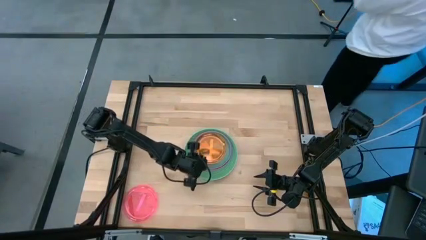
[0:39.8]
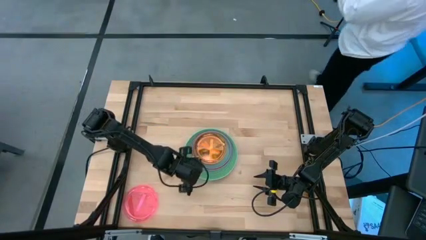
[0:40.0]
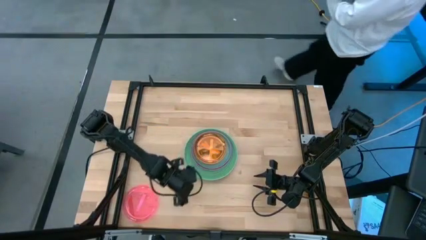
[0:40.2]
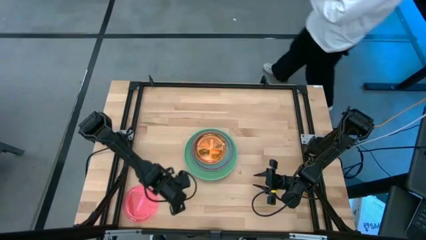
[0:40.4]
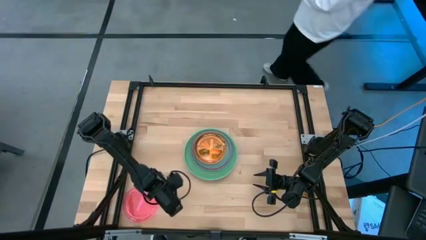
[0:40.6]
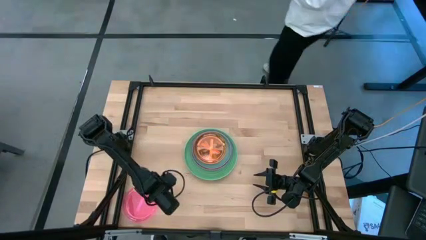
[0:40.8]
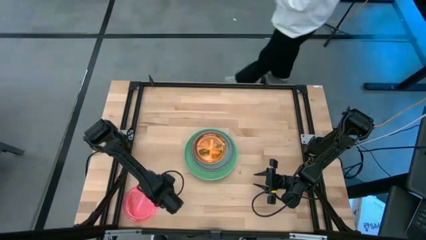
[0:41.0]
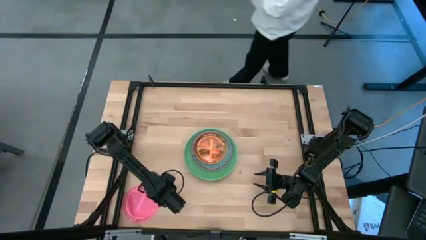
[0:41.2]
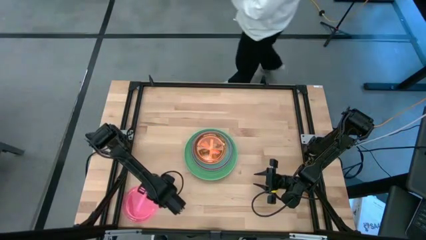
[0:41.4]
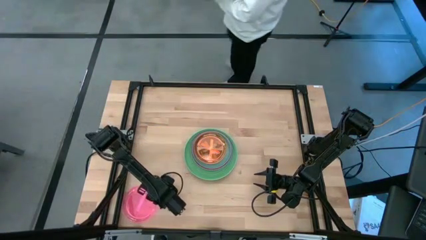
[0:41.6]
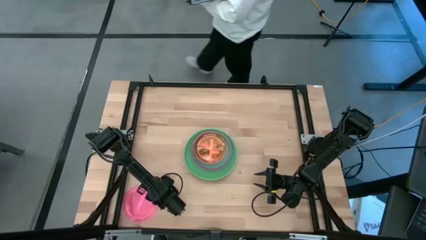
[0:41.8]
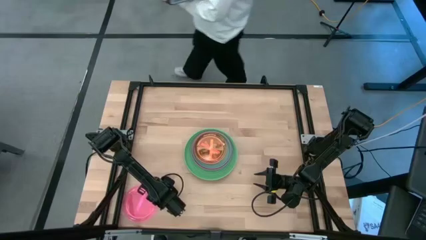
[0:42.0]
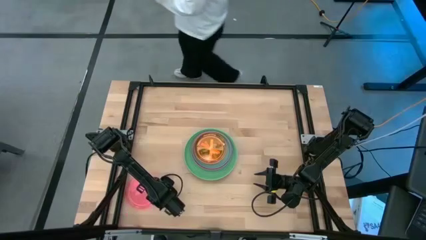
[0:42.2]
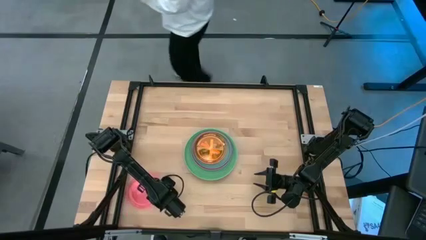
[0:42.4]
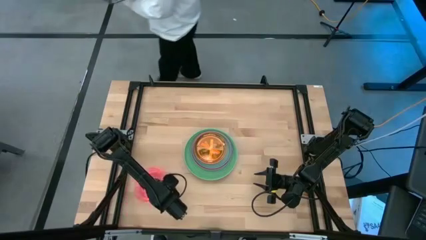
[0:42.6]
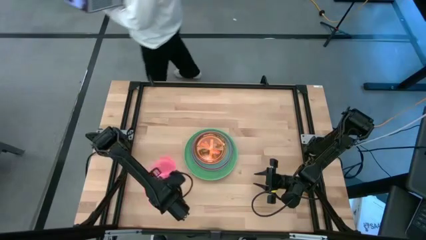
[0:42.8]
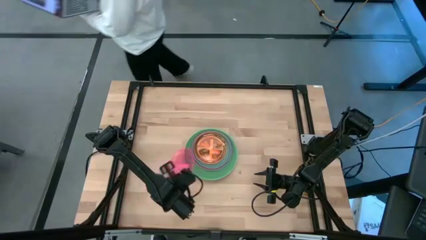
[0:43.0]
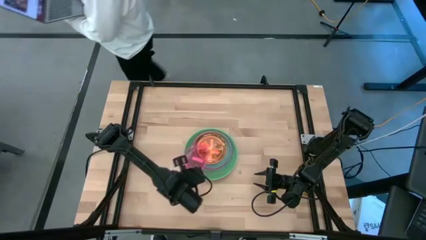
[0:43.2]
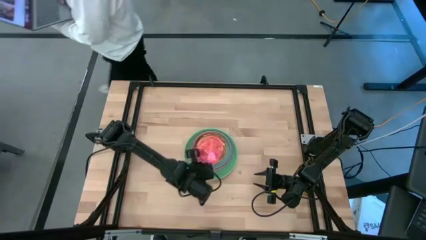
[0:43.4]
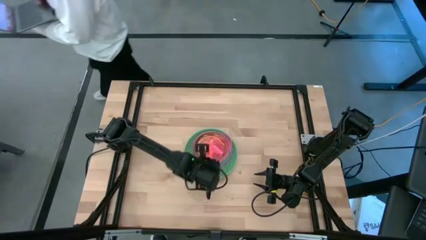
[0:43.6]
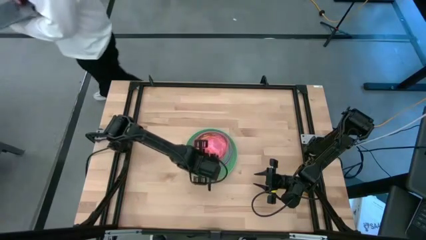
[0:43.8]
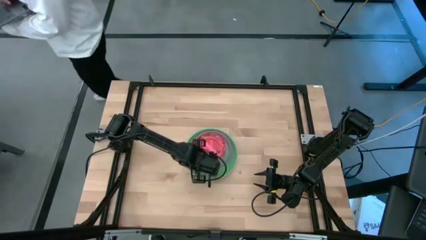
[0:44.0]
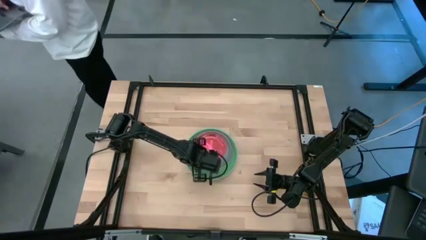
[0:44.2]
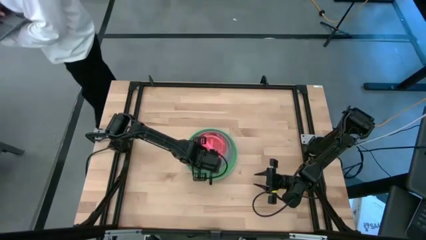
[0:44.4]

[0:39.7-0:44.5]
Task: Stack plastic plates
Stack the light pink plate on the orange plate

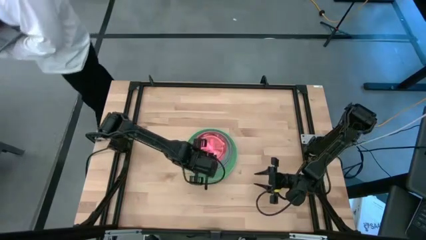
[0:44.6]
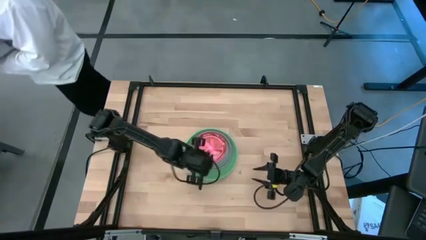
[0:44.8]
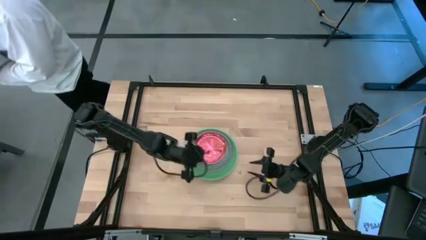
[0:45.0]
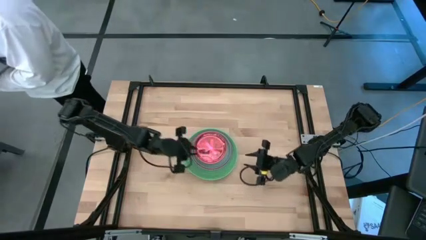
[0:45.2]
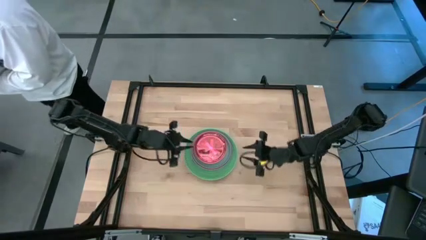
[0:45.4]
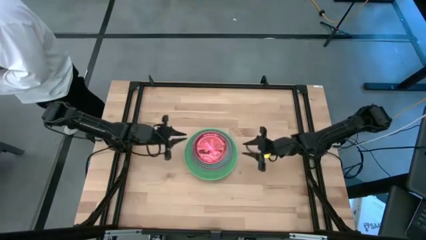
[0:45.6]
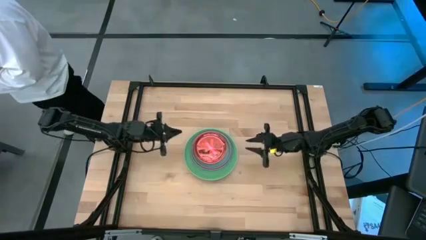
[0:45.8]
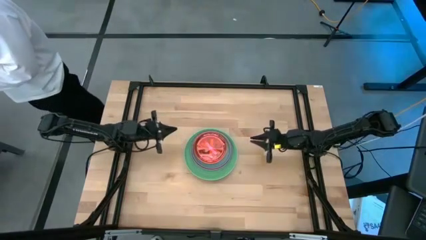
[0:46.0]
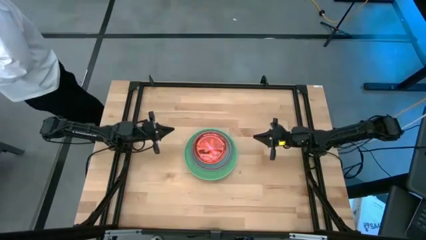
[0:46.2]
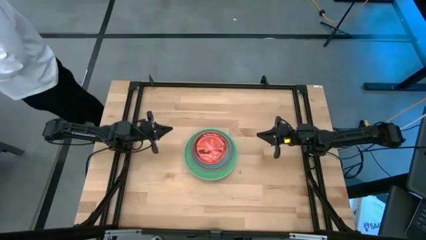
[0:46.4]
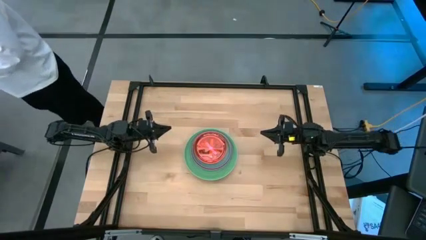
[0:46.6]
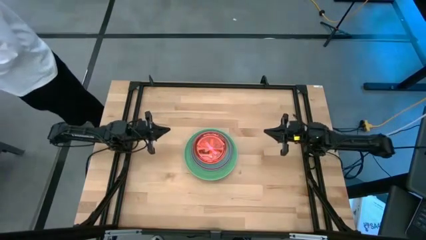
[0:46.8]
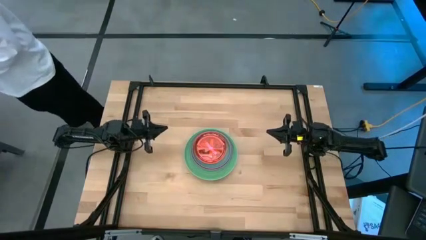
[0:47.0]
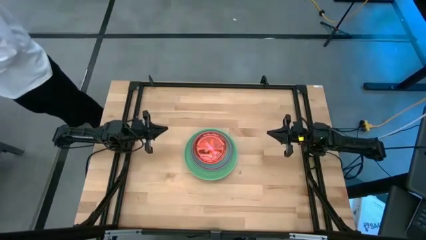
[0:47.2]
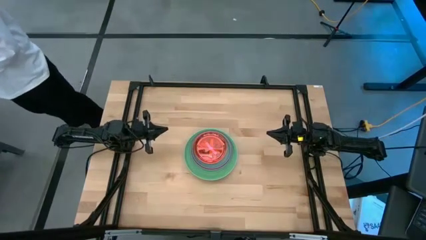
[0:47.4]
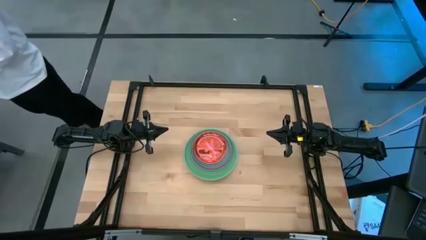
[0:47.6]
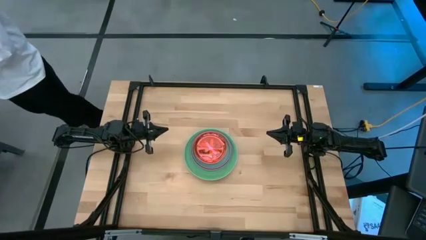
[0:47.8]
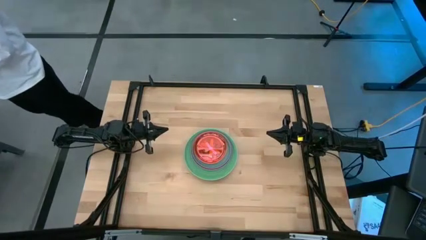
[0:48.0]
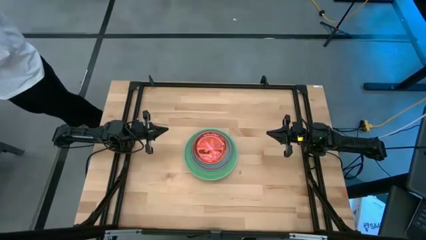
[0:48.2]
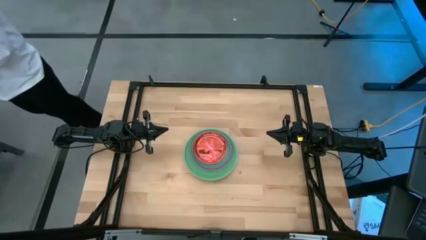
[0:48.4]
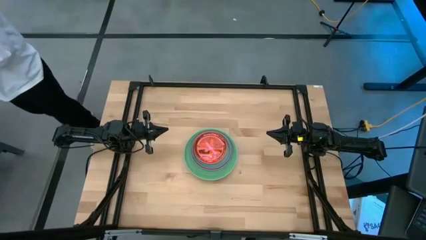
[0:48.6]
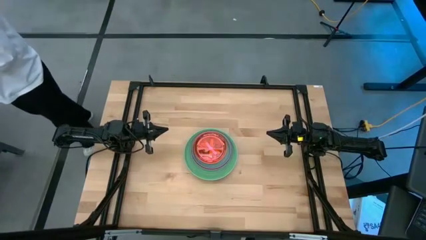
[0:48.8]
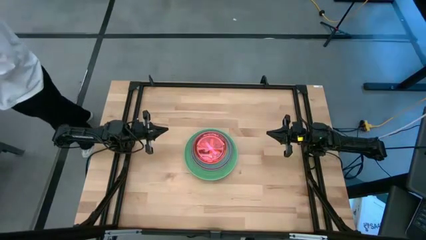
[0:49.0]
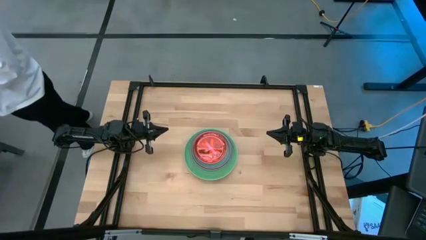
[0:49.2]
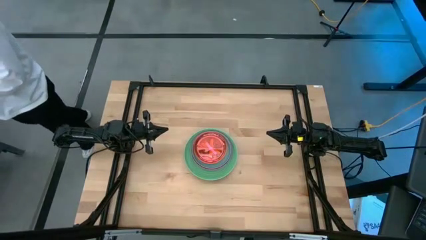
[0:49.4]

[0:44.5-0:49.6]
Return to Home Position

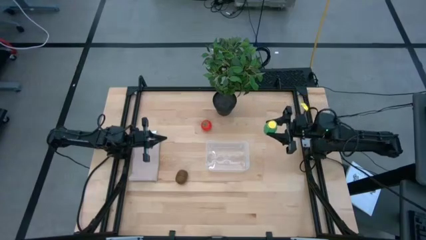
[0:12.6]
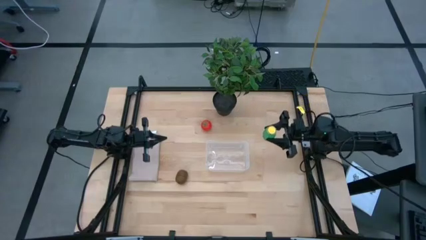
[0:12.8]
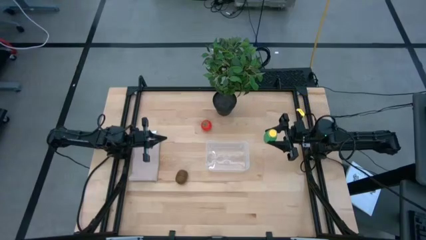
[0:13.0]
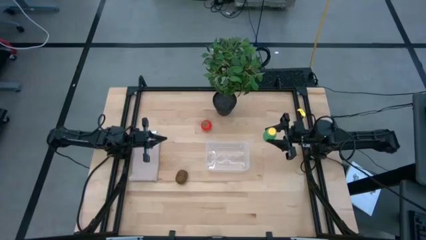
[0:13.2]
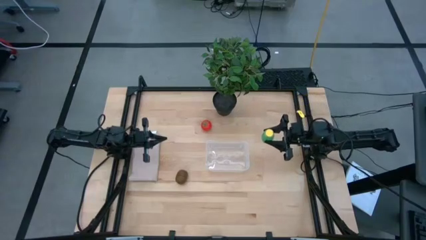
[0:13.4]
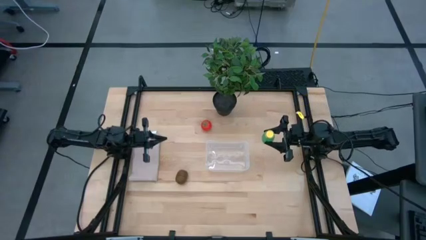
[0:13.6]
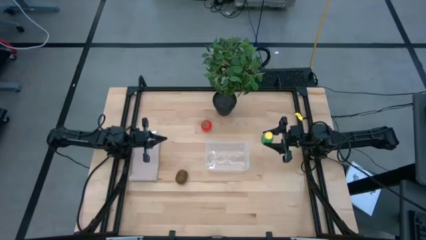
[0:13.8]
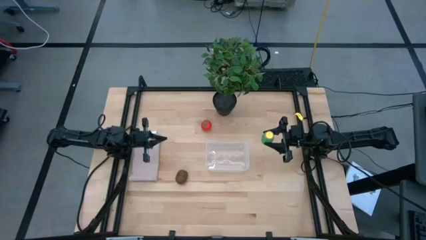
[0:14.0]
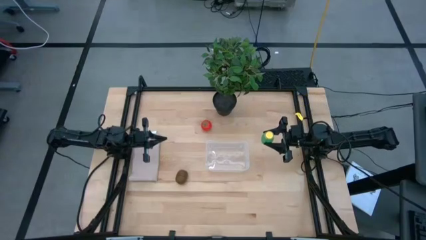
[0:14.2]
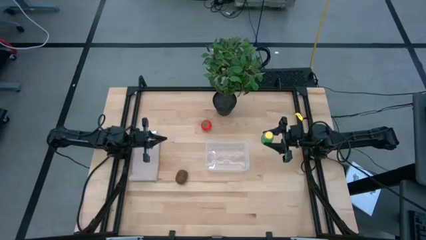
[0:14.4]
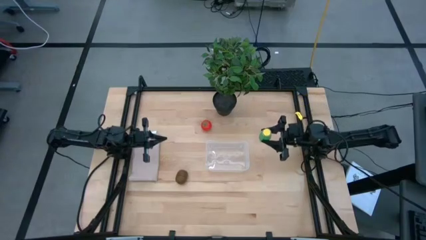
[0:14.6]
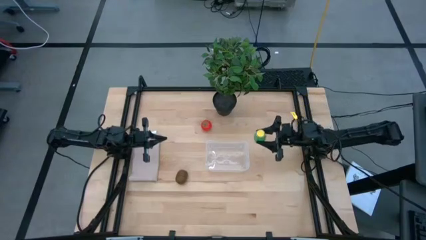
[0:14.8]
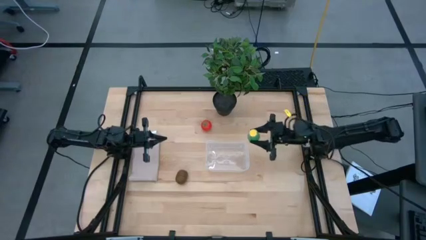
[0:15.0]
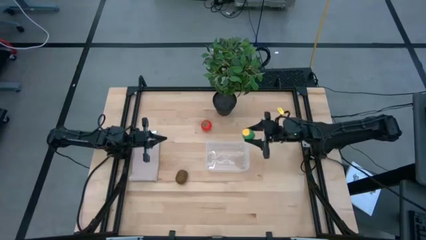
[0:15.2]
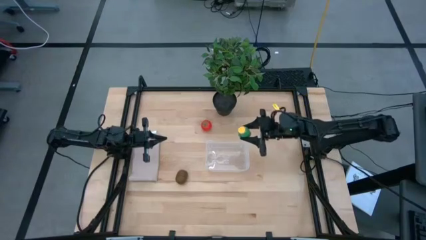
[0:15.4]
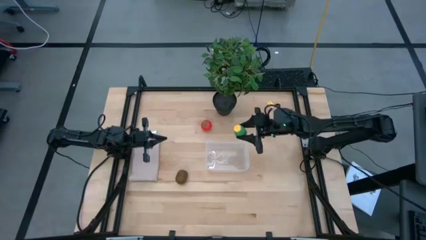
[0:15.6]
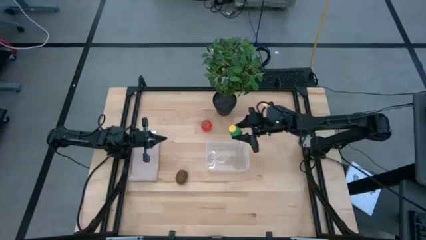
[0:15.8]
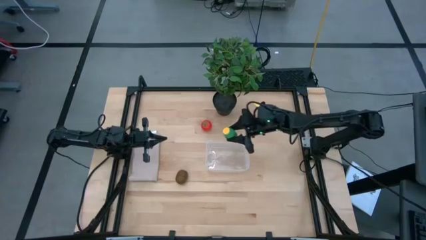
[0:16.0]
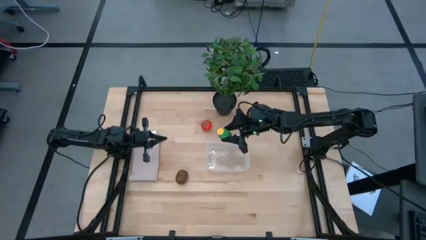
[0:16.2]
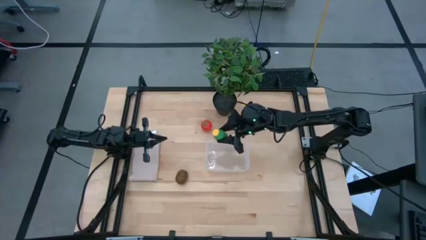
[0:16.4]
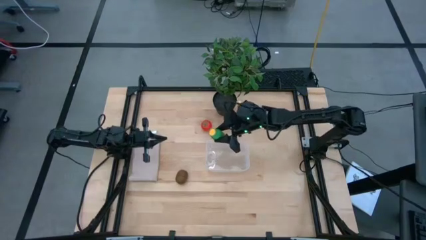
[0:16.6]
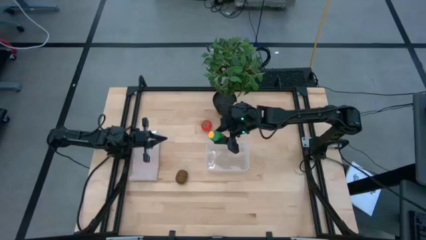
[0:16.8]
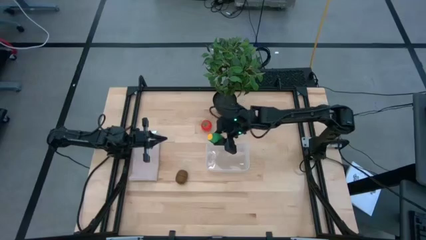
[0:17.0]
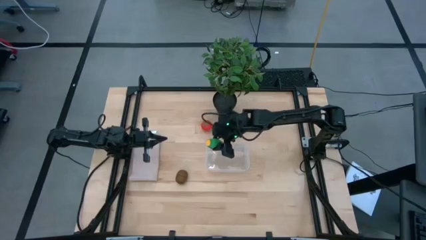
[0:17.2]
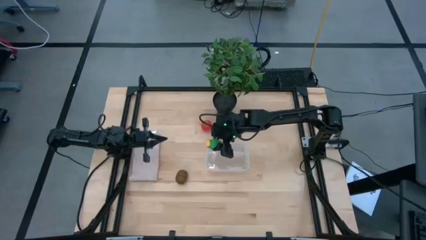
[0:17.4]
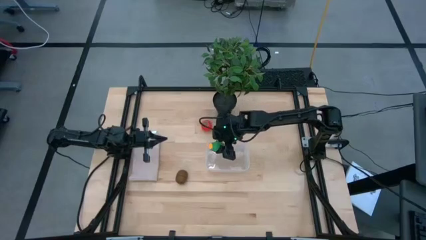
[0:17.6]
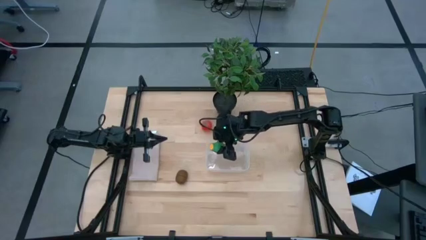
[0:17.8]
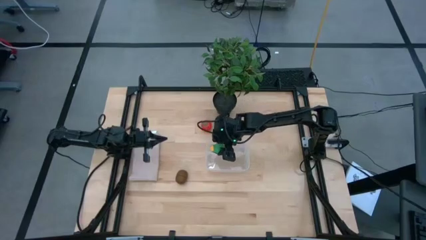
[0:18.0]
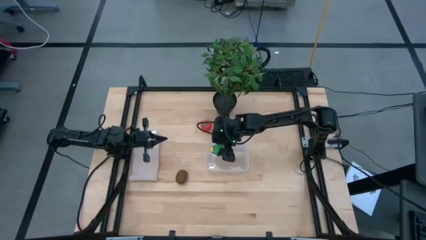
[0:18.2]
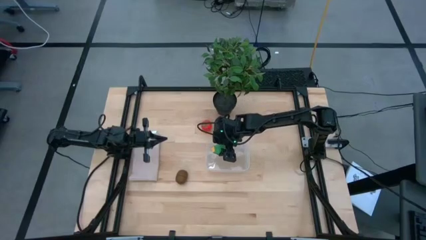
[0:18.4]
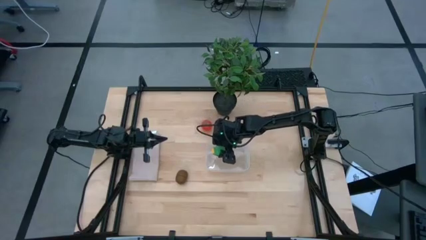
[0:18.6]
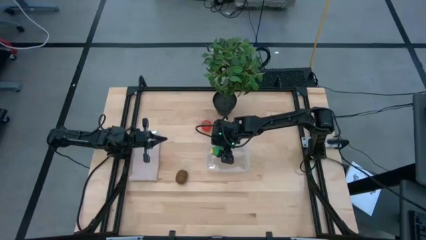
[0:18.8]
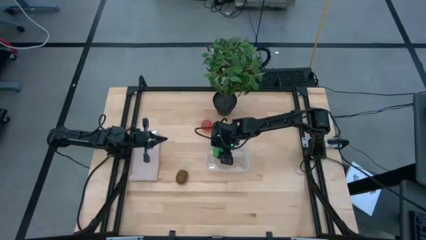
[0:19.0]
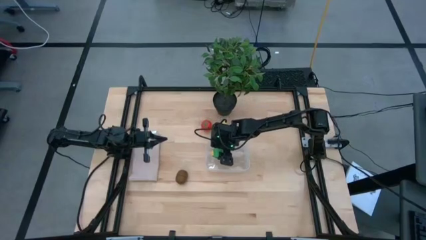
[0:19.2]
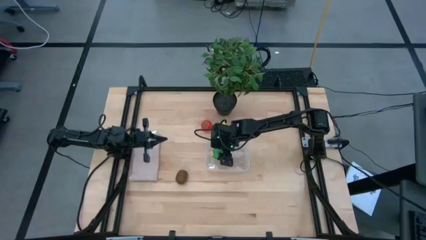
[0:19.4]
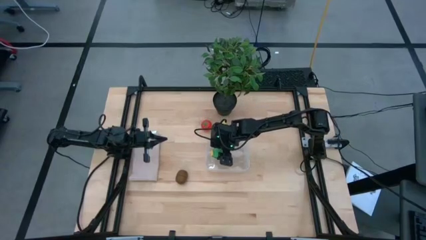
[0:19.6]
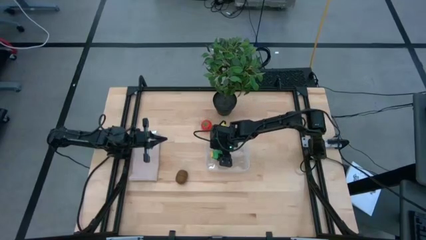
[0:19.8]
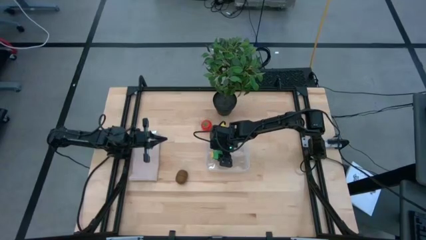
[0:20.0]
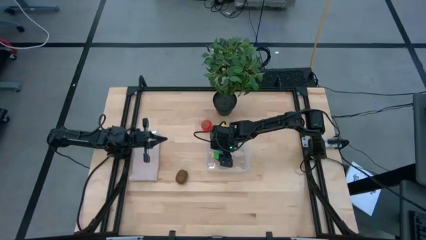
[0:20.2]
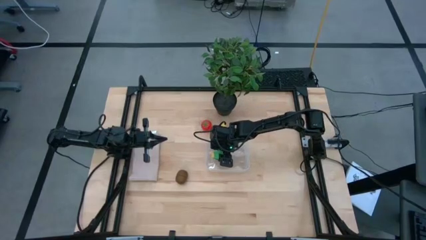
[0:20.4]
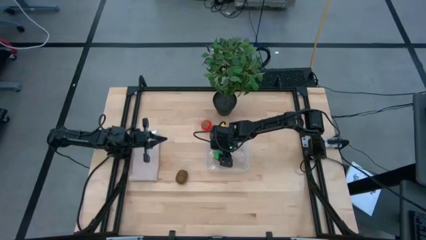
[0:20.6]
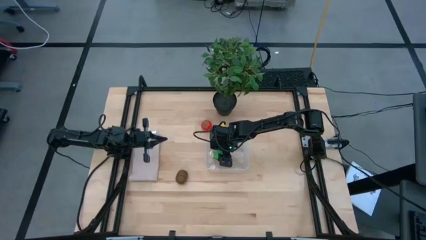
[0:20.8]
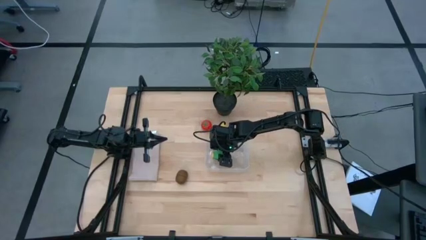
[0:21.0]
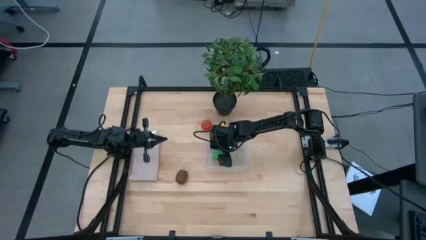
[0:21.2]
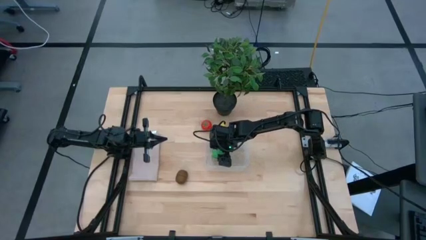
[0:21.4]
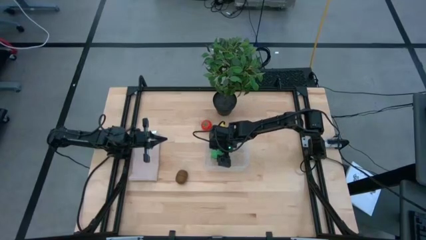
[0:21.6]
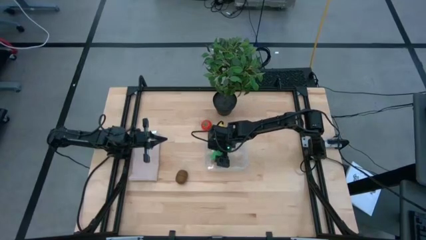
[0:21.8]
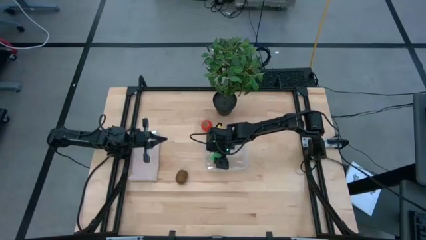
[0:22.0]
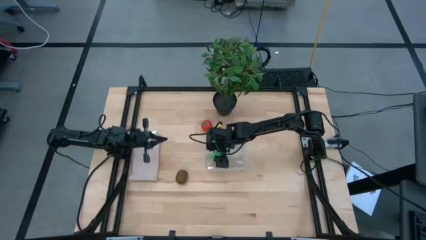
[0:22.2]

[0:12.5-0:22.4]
Task: Pick and placing Produce into tupperware
Put the green corn into the transparent bin
